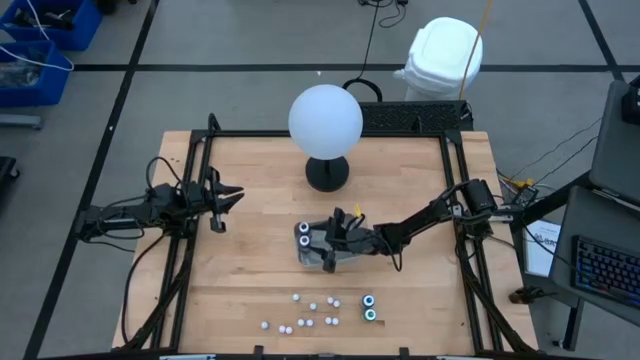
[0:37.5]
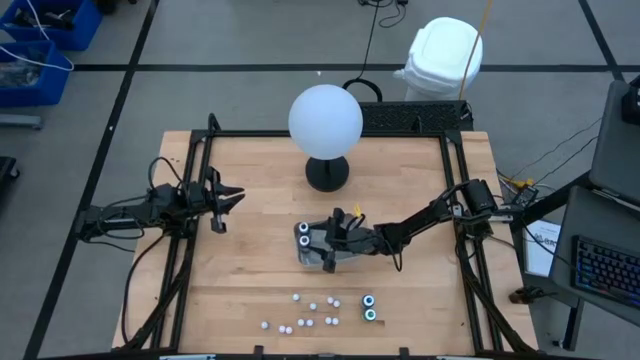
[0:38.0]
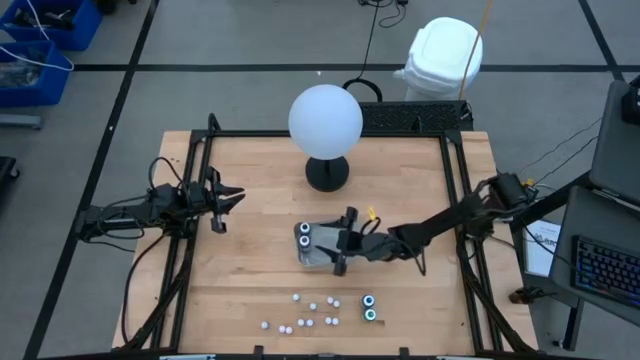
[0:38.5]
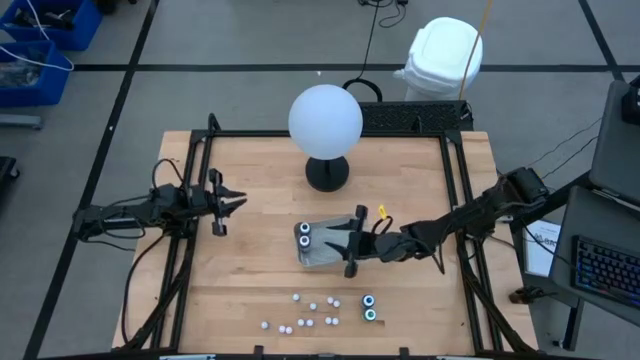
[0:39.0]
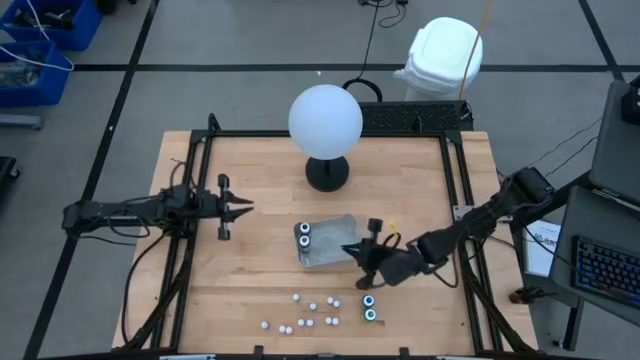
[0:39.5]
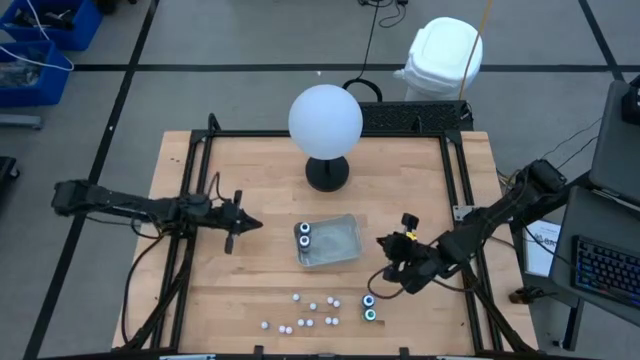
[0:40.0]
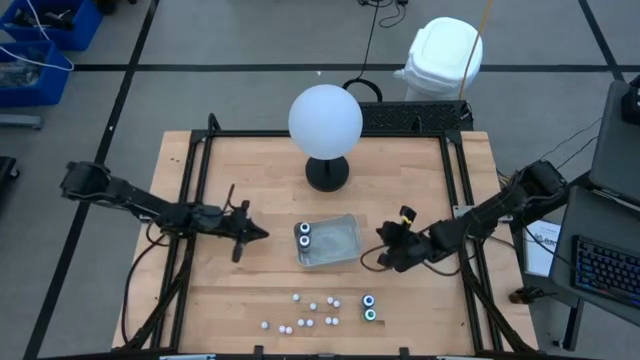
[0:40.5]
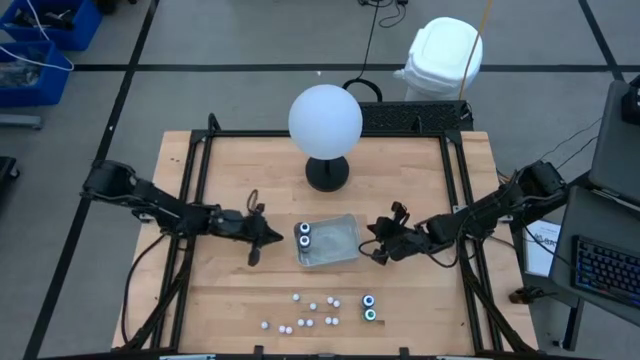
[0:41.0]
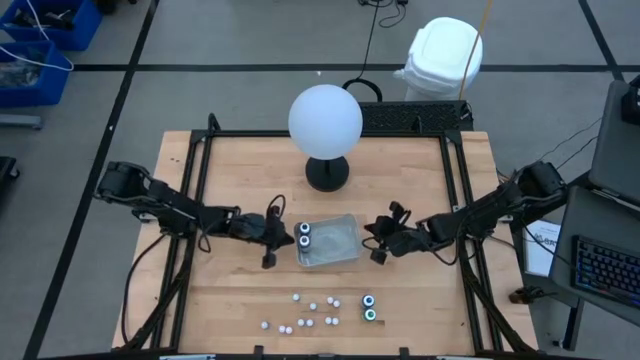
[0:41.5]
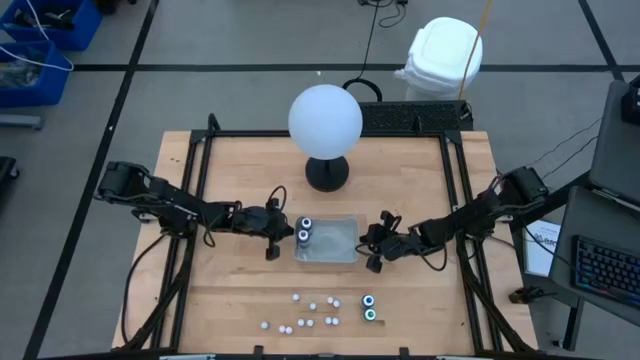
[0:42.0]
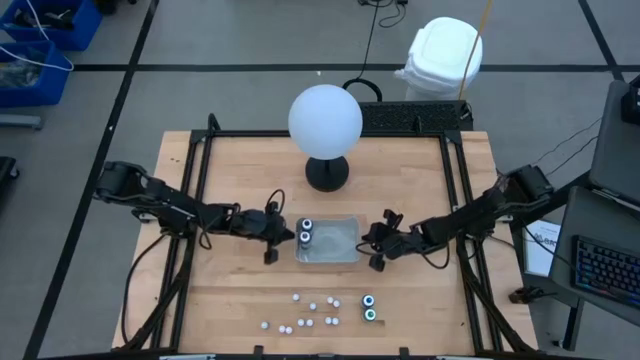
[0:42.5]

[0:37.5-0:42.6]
Task: Pick & Place food coloring
Adjust the gray bin on the table

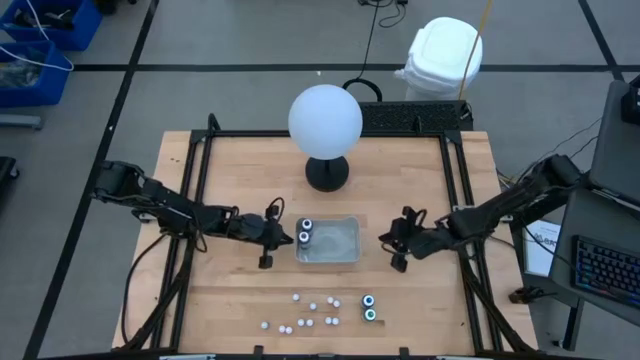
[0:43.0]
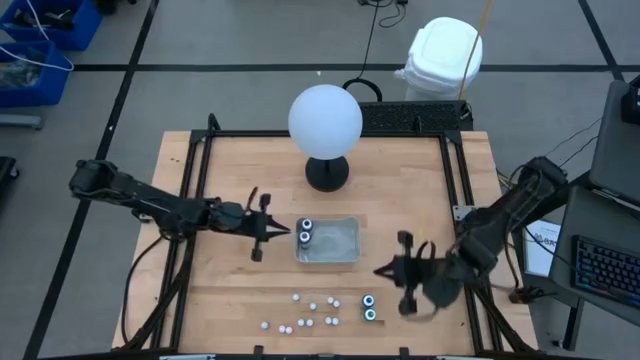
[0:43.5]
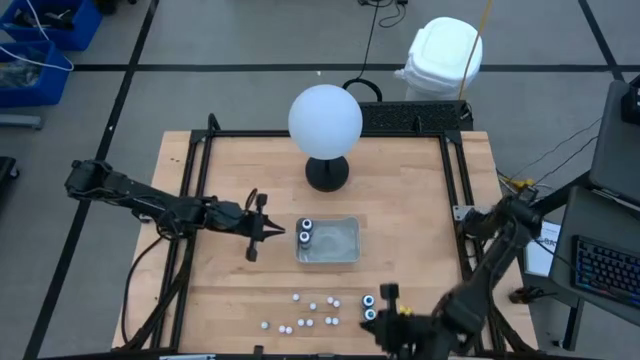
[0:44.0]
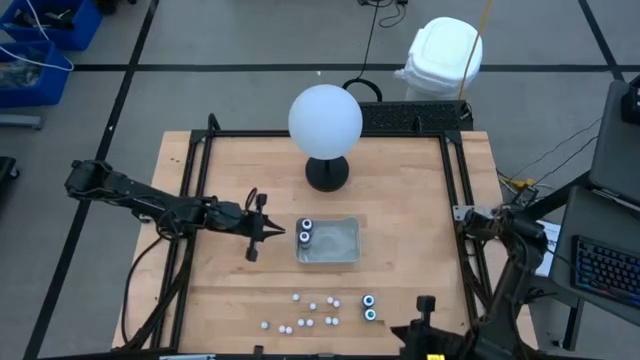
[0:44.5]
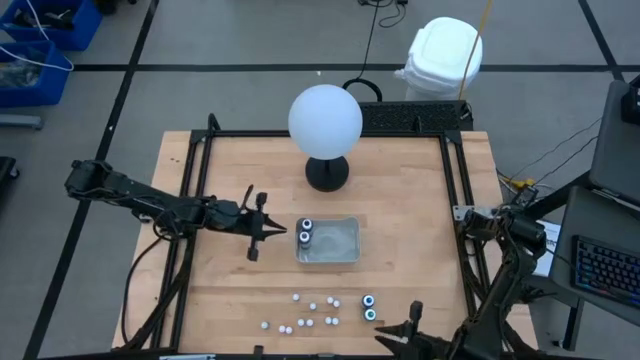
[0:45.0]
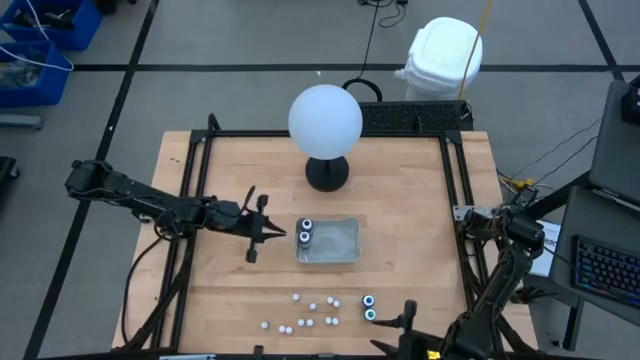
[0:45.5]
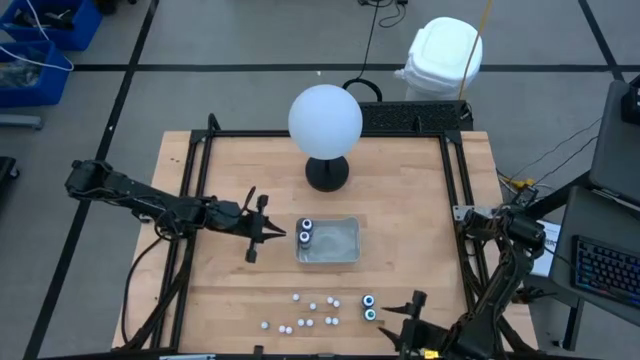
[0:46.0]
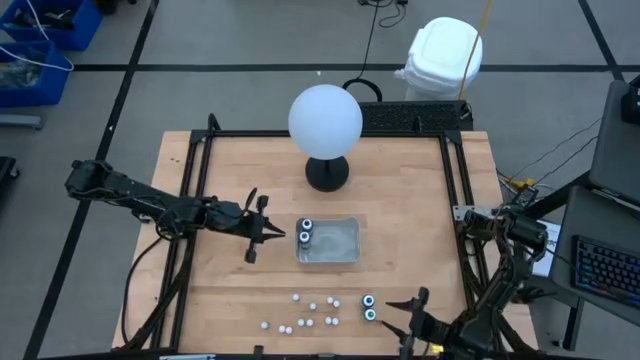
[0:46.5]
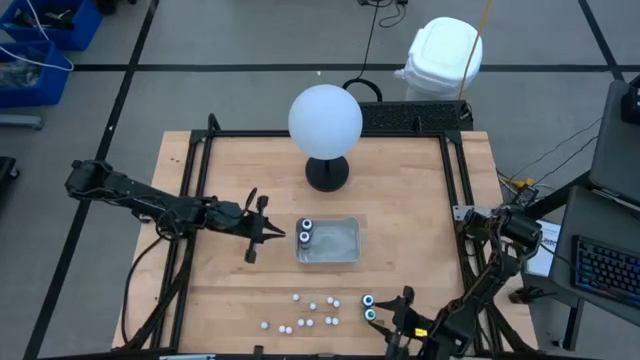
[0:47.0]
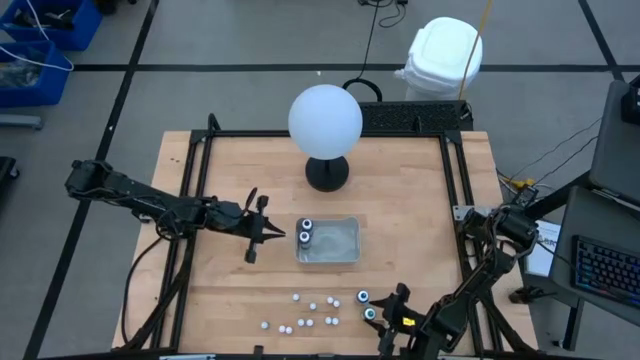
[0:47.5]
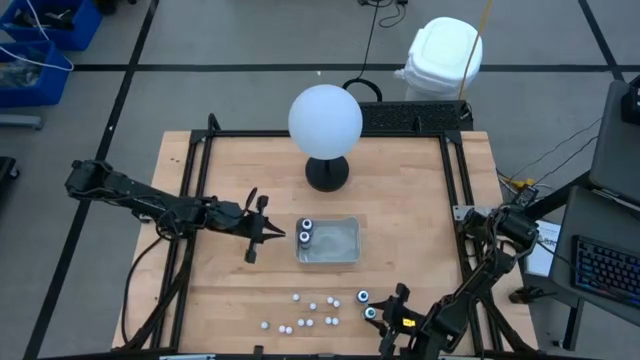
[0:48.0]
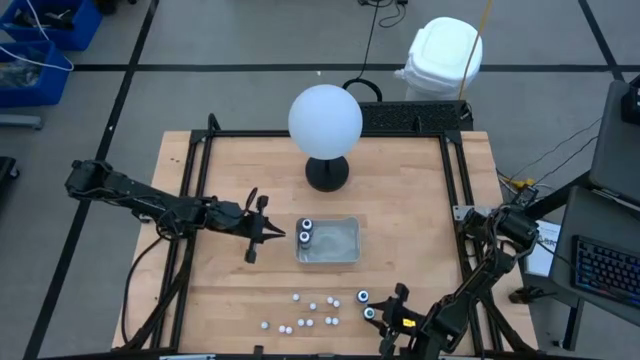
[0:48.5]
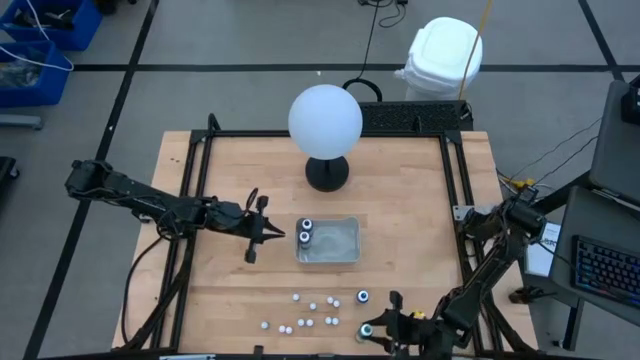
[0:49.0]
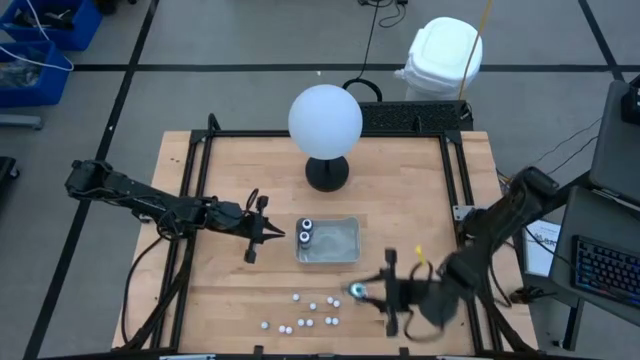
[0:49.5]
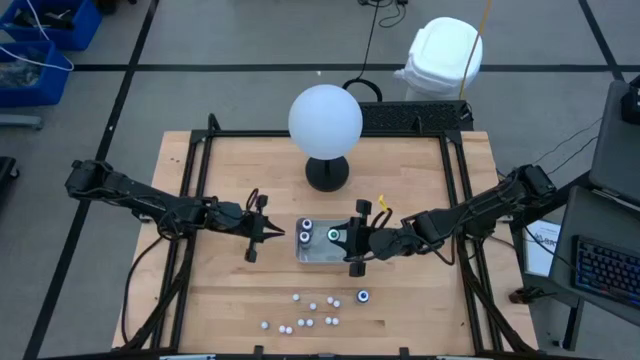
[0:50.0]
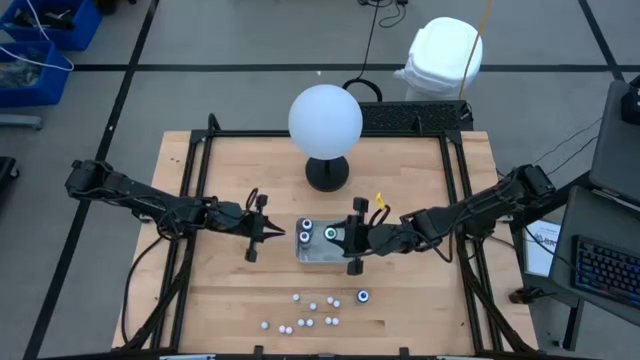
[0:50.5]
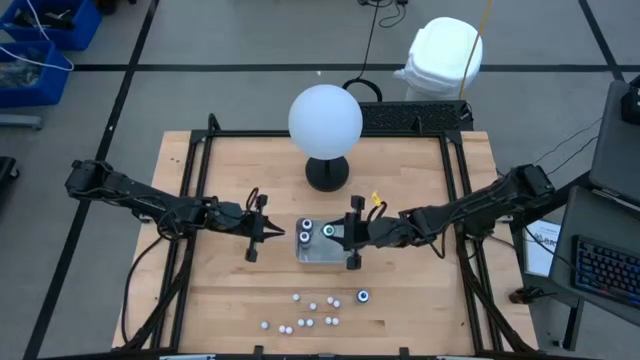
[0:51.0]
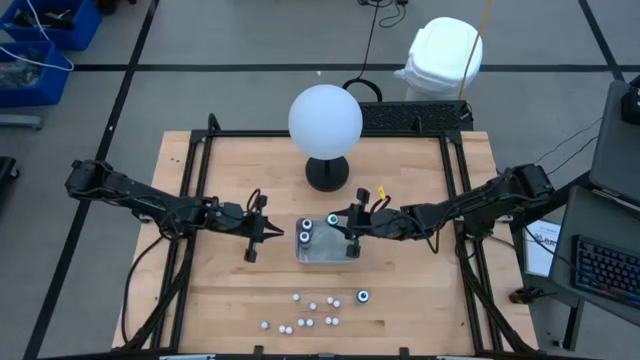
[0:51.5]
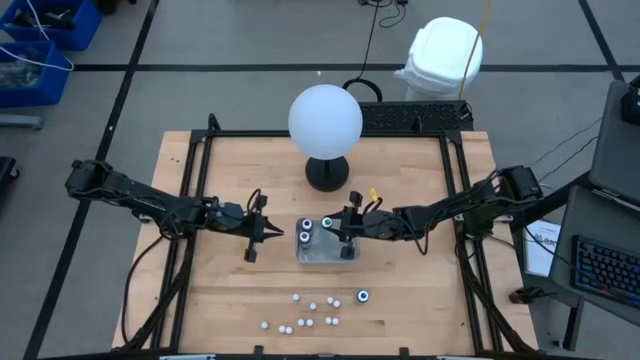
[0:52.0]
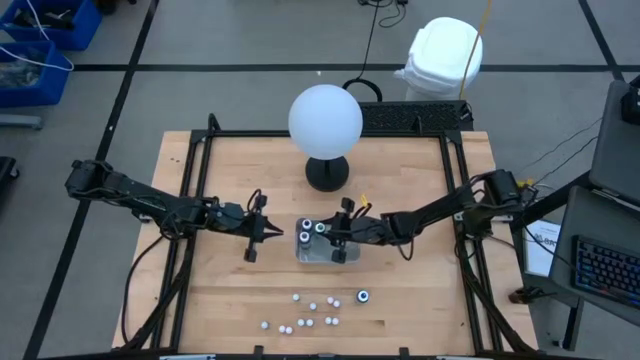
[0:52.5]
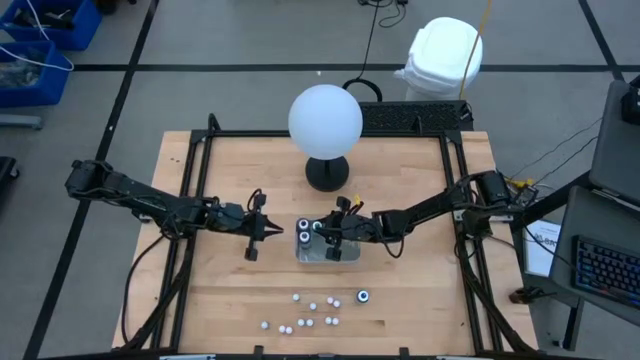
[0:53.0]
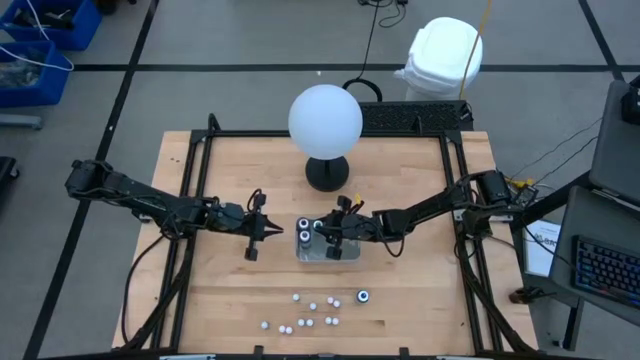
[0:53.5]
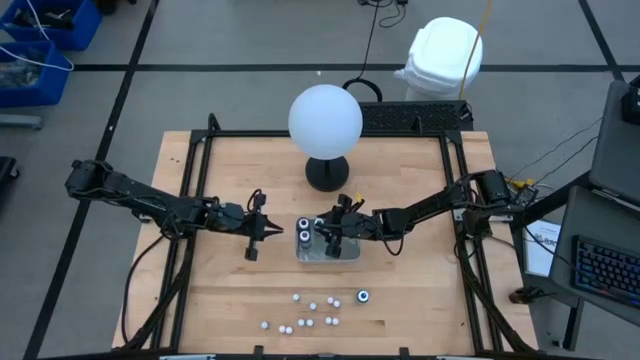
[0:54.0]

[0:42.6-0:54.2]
Put the large green food coloring bottle into the gray bin

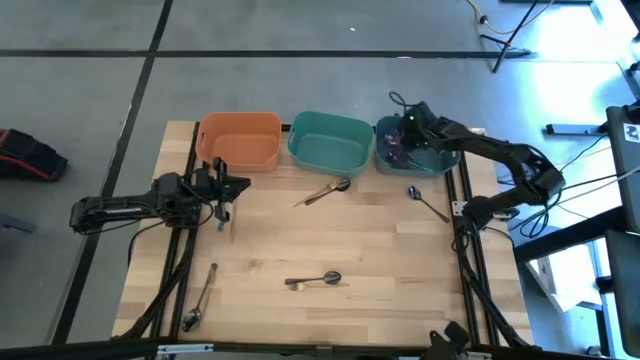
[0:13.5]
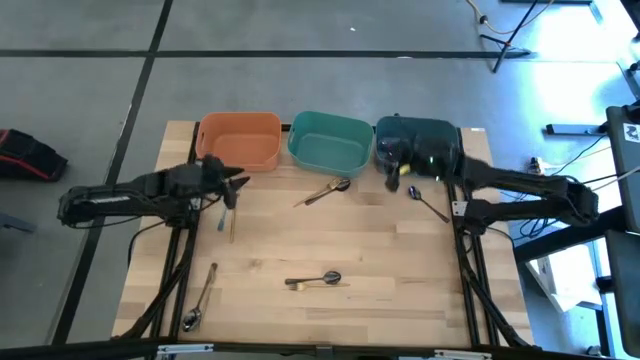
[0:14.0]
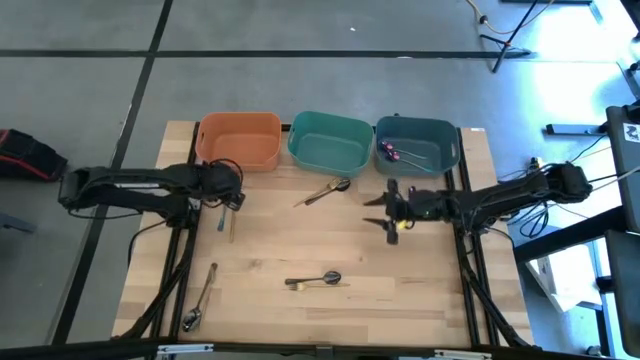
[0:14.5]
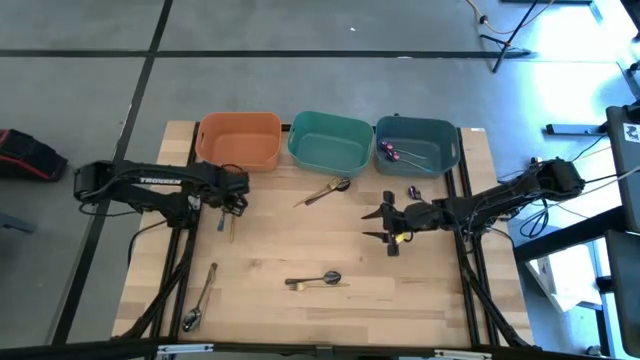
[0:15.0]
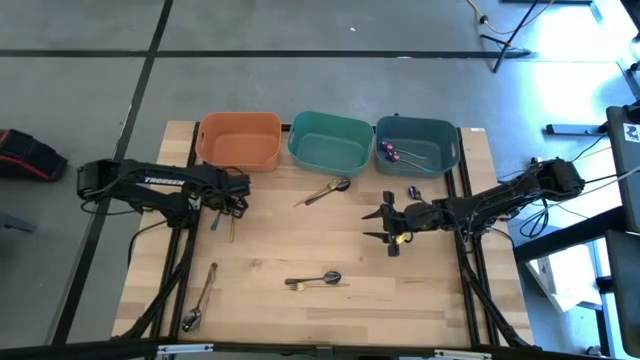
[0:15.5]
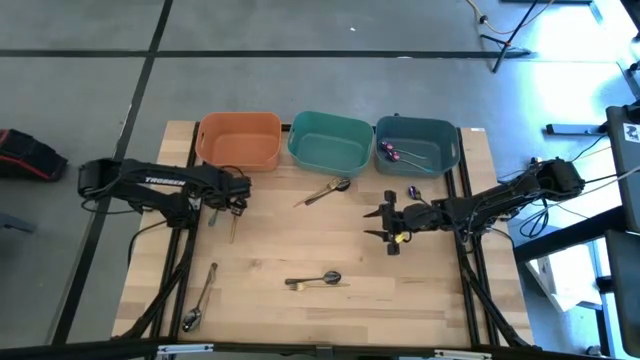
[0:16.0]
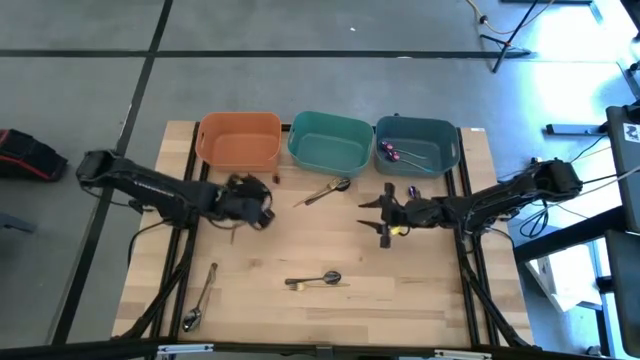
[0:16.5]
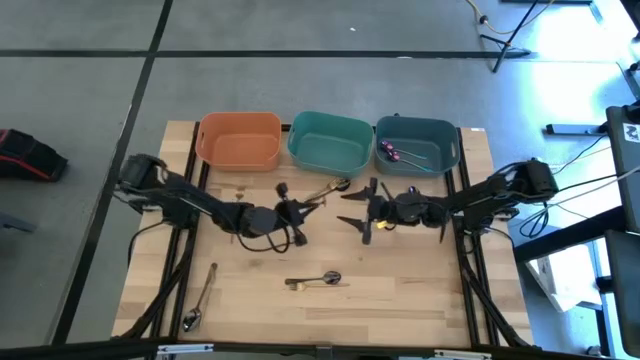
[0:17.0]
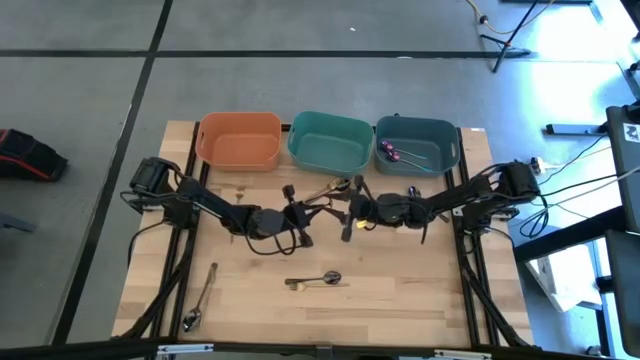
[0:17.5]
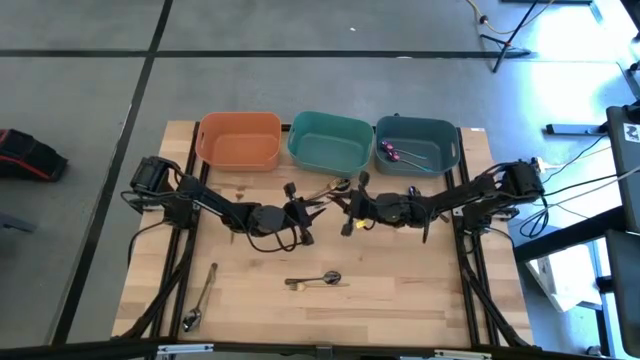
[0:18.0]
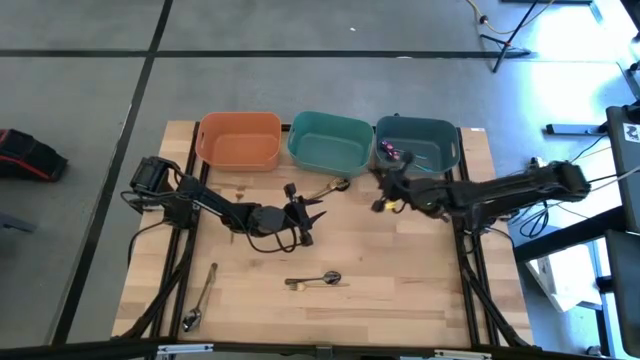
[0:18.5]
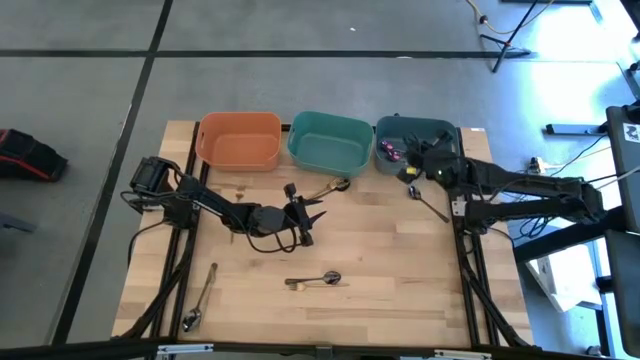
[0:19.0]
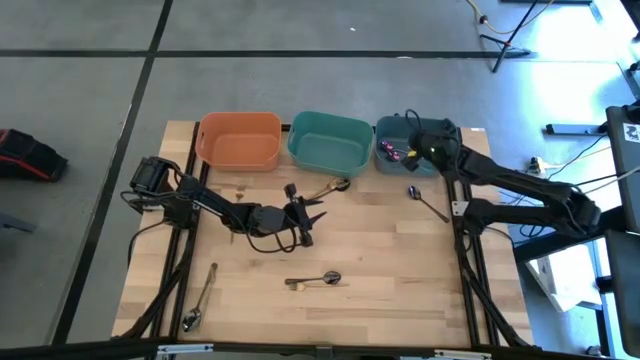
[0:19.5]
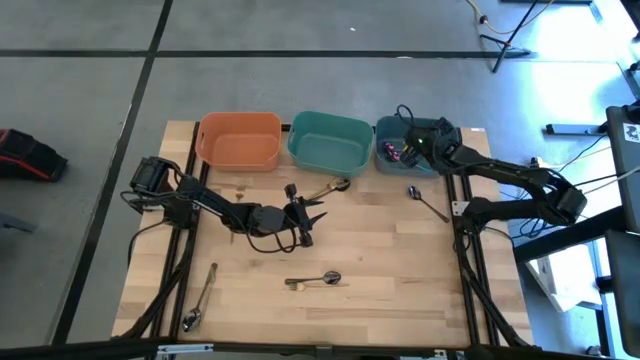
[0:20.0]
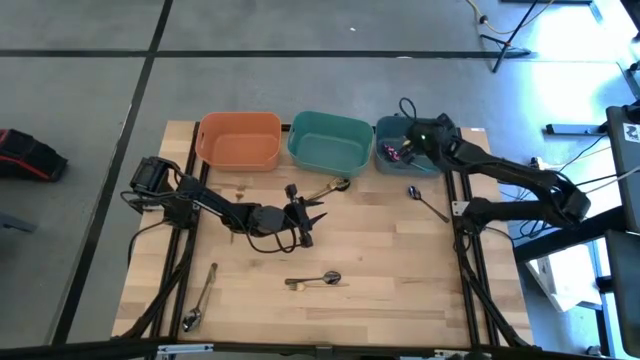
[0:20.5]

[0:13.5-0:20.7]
Task: Sort silverware by color (type)
Put the blue spoon into the blue bin
